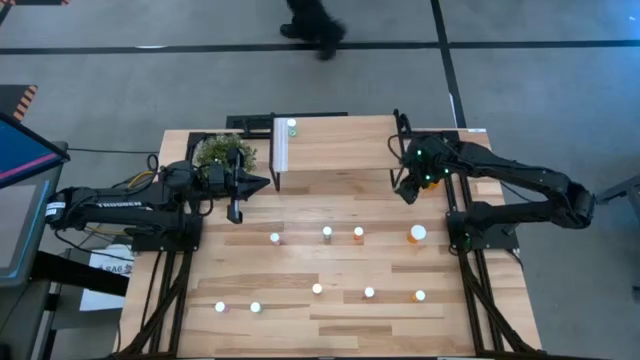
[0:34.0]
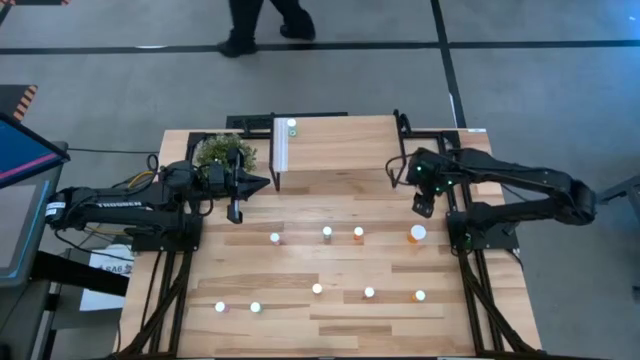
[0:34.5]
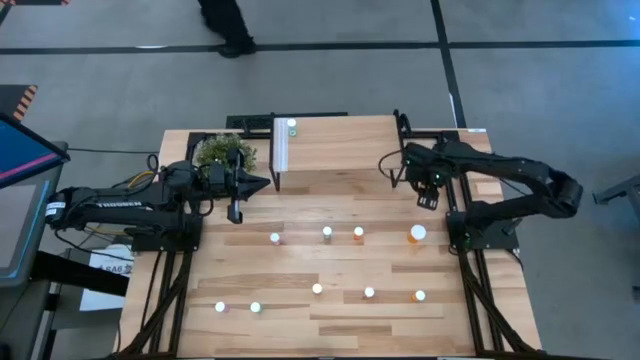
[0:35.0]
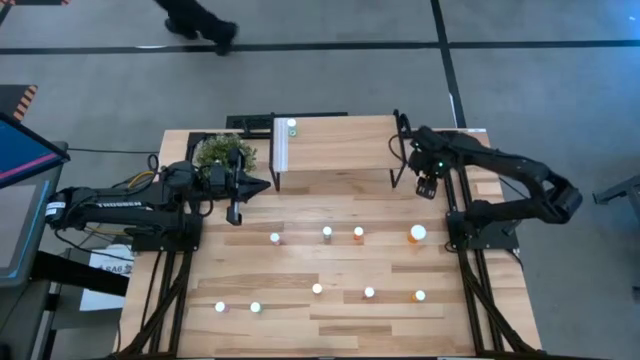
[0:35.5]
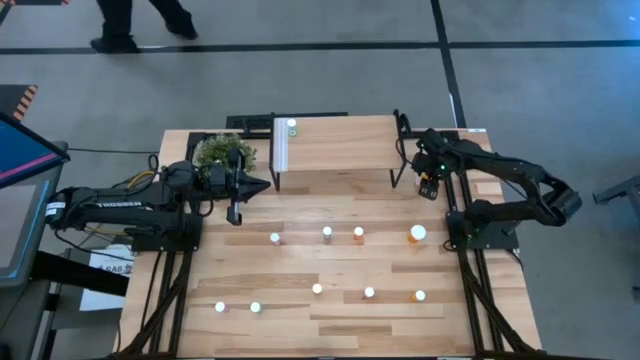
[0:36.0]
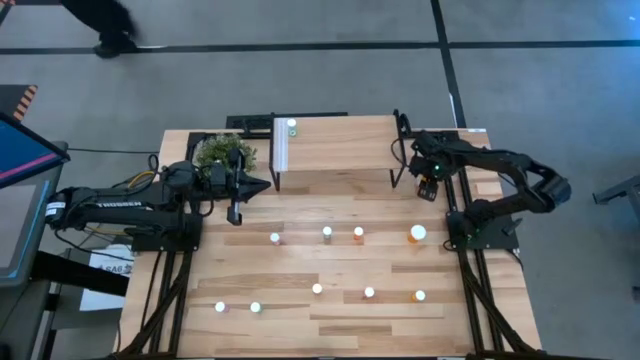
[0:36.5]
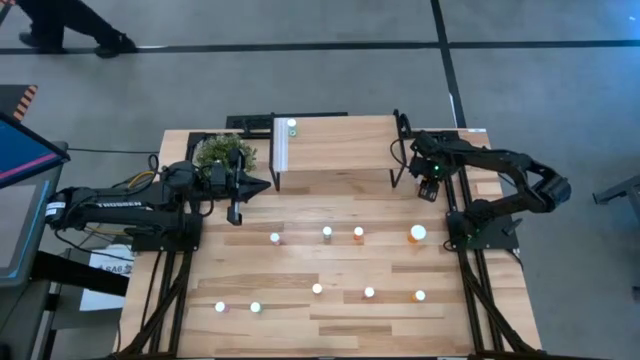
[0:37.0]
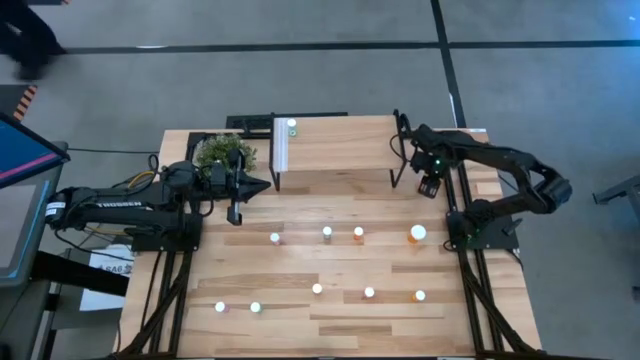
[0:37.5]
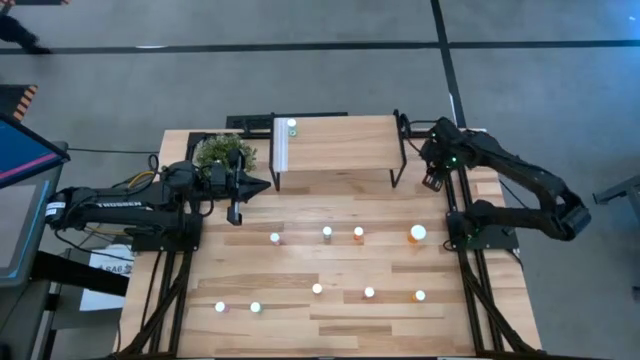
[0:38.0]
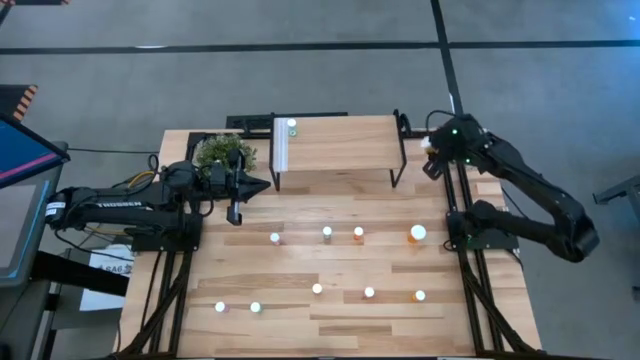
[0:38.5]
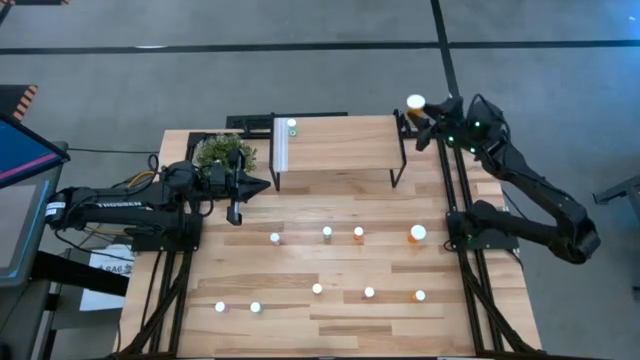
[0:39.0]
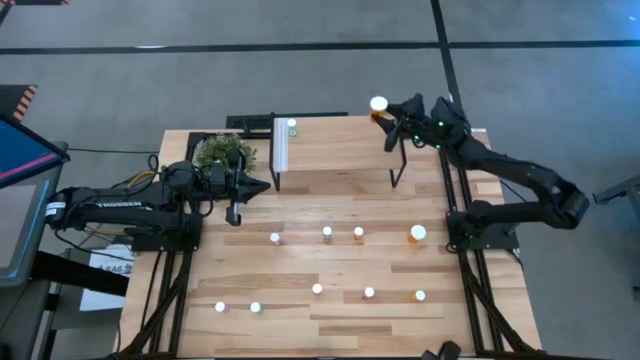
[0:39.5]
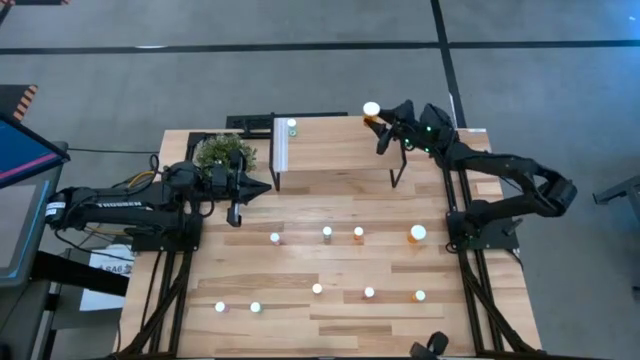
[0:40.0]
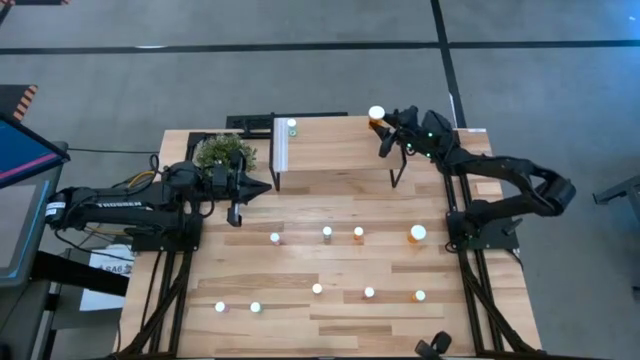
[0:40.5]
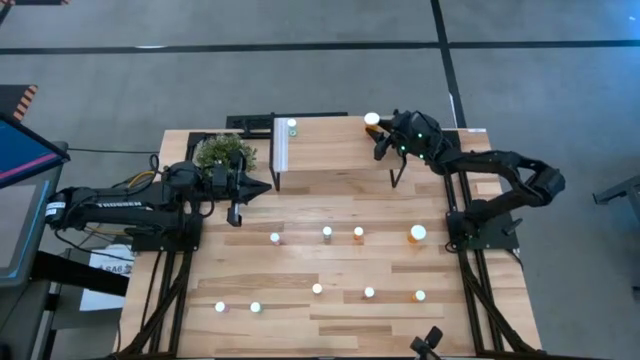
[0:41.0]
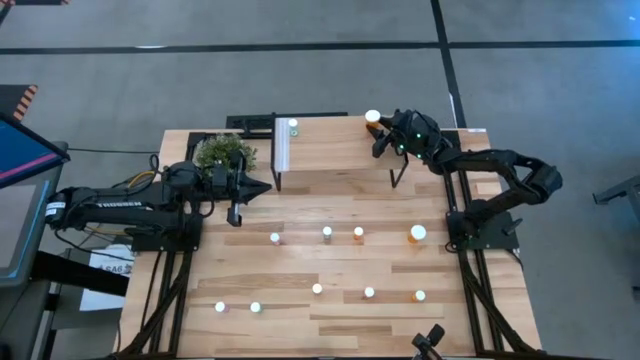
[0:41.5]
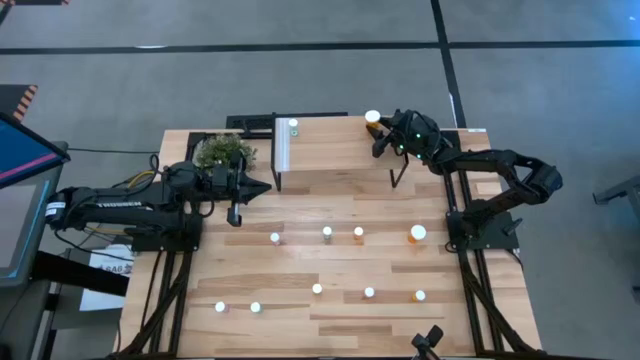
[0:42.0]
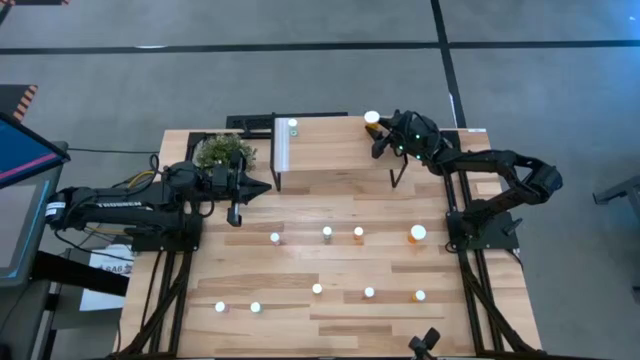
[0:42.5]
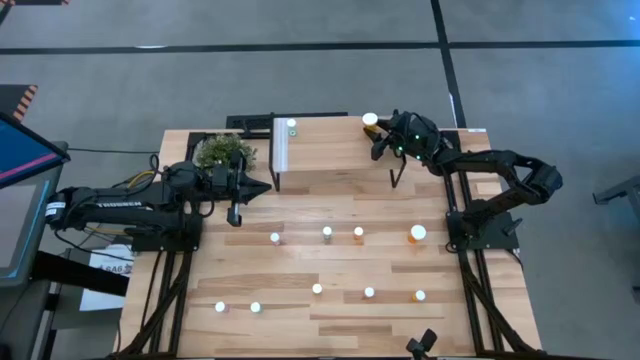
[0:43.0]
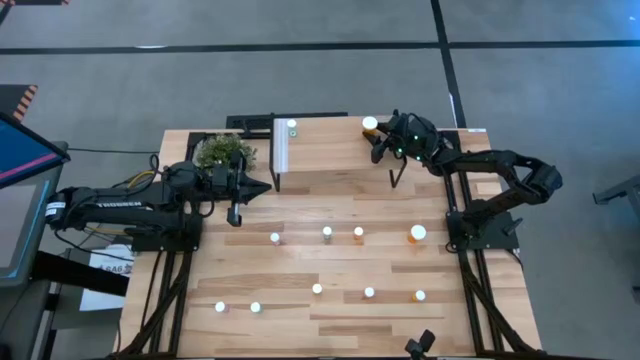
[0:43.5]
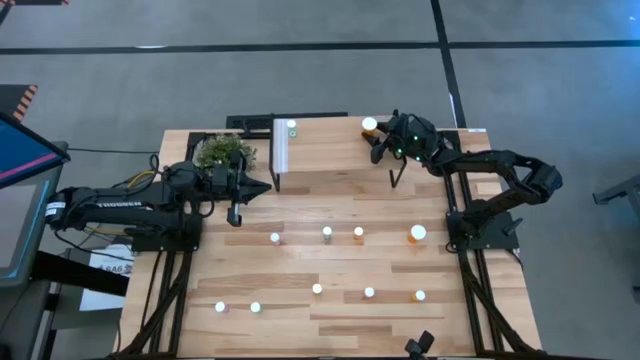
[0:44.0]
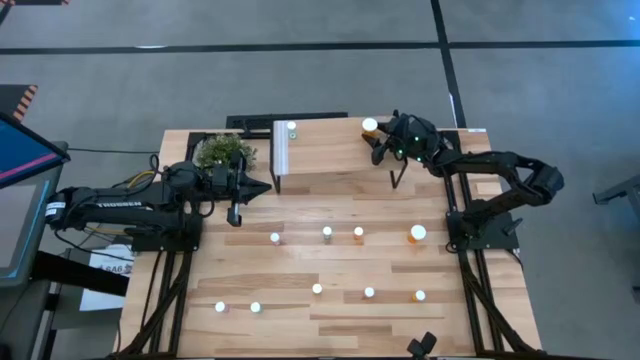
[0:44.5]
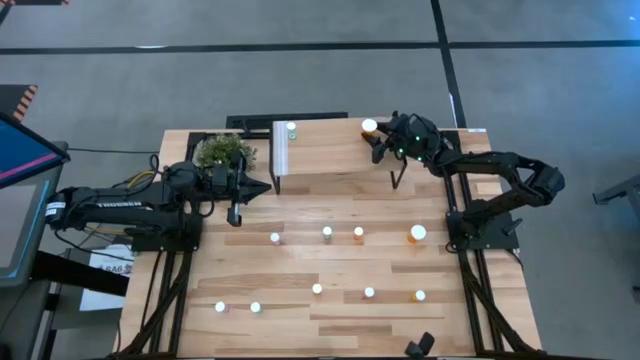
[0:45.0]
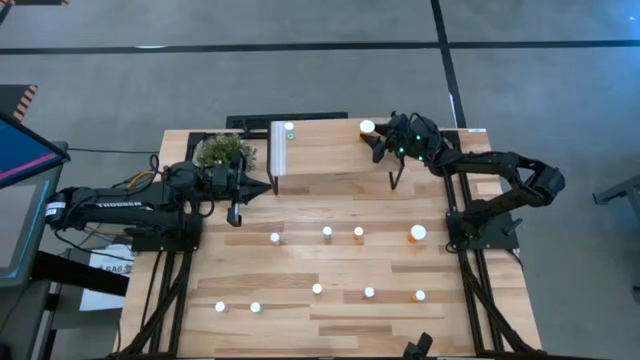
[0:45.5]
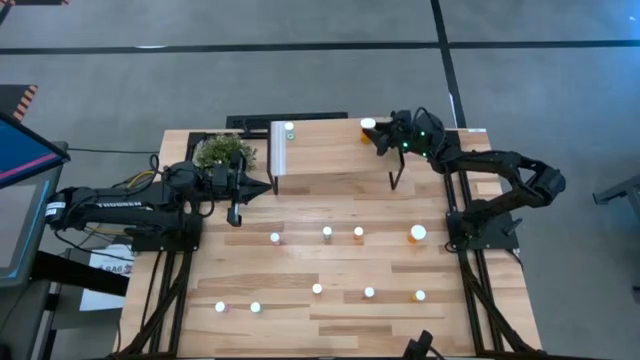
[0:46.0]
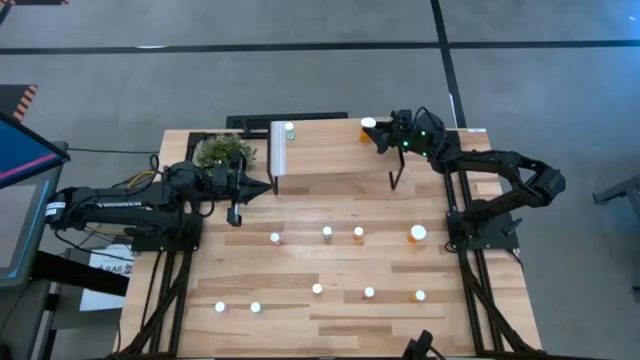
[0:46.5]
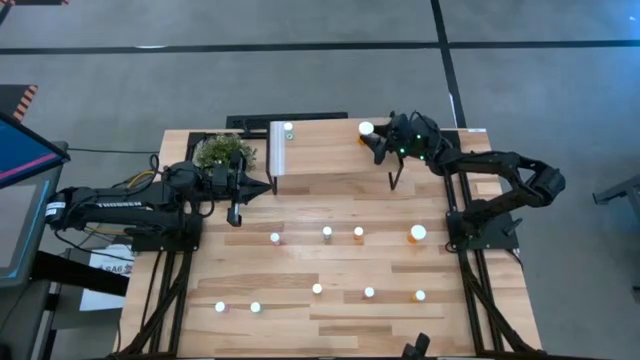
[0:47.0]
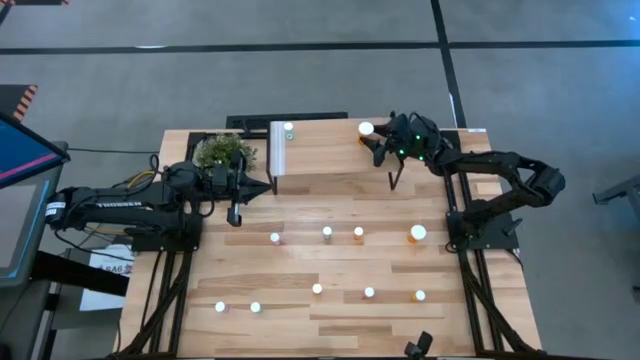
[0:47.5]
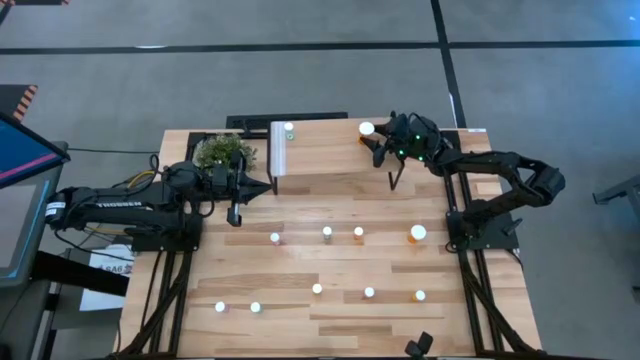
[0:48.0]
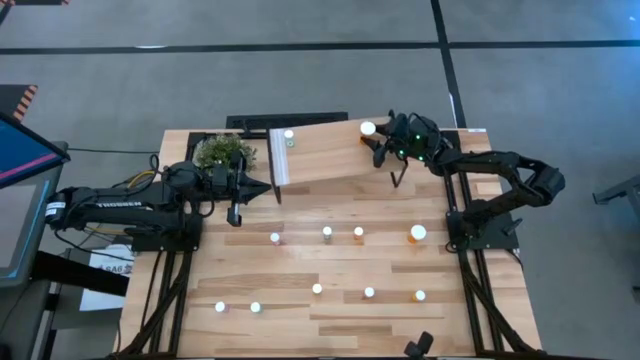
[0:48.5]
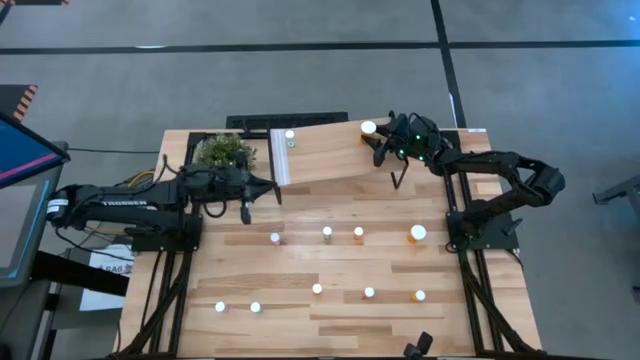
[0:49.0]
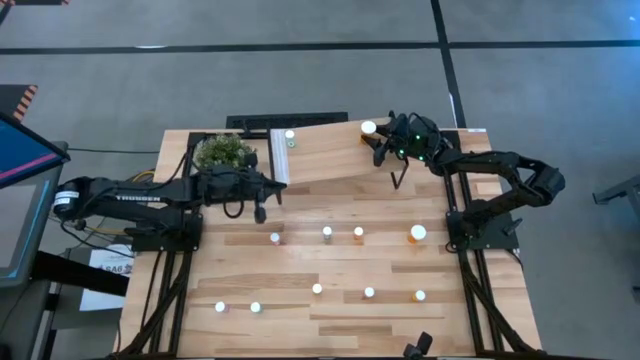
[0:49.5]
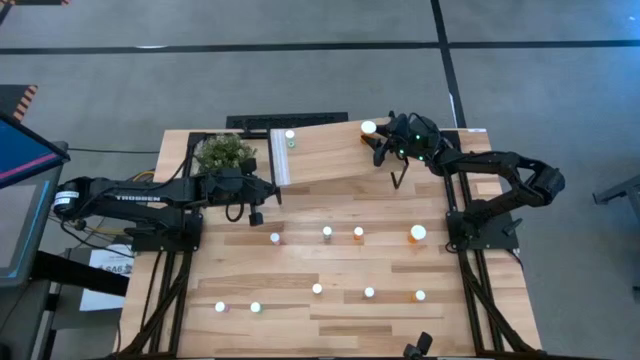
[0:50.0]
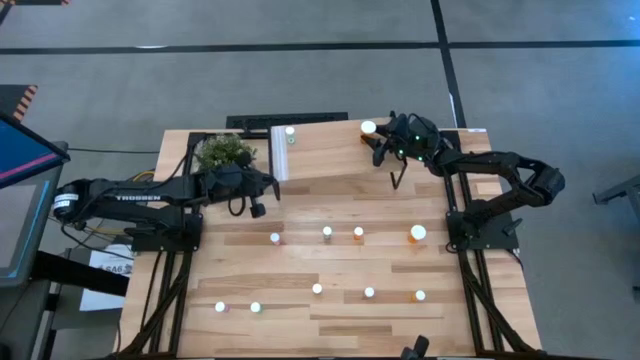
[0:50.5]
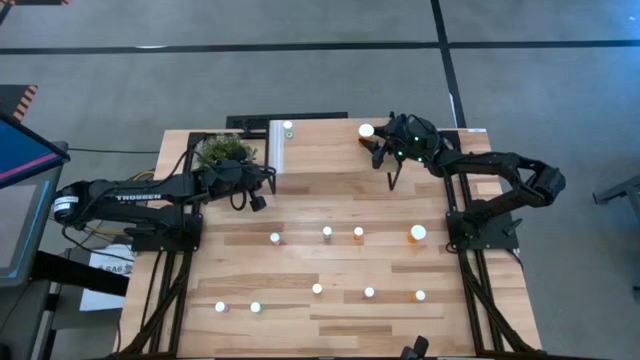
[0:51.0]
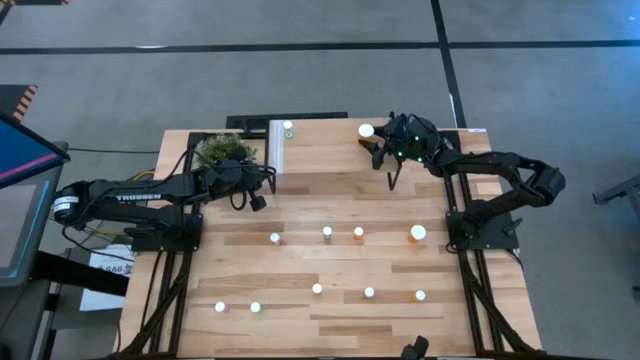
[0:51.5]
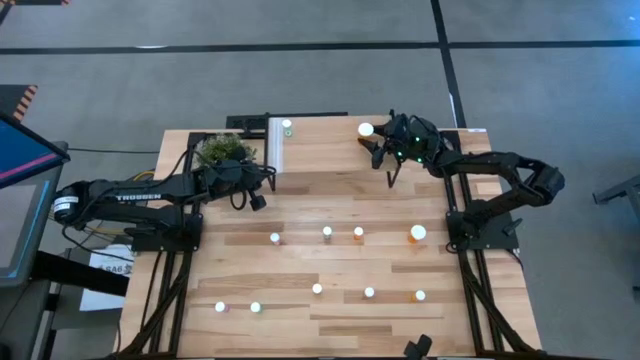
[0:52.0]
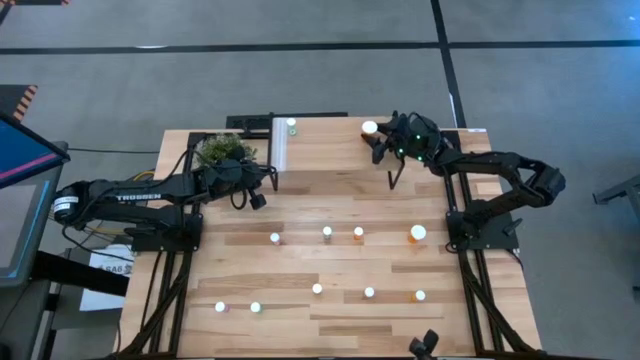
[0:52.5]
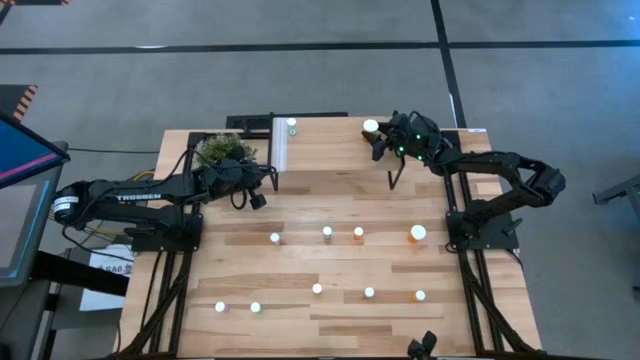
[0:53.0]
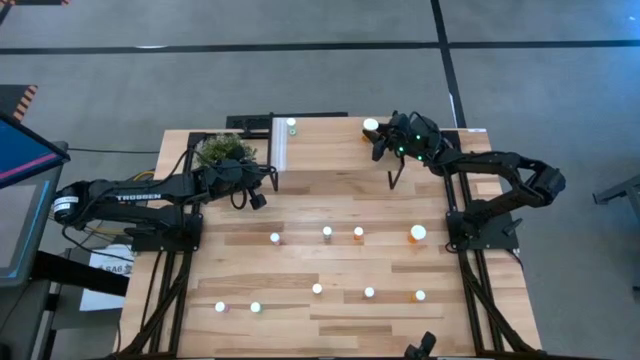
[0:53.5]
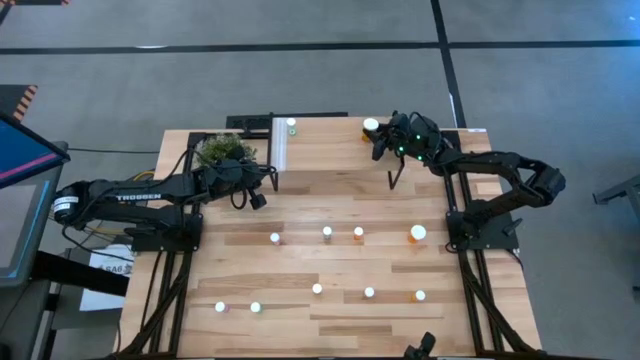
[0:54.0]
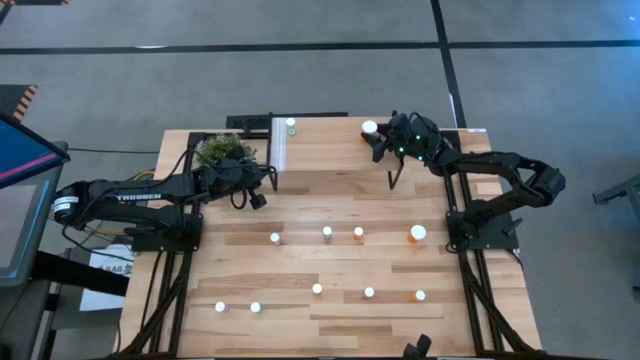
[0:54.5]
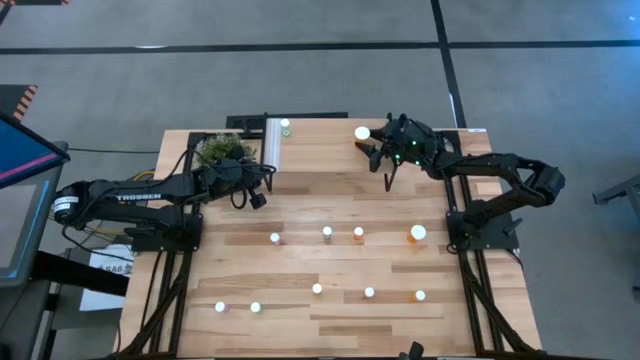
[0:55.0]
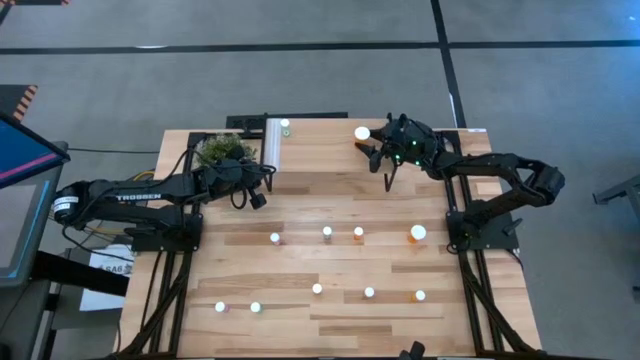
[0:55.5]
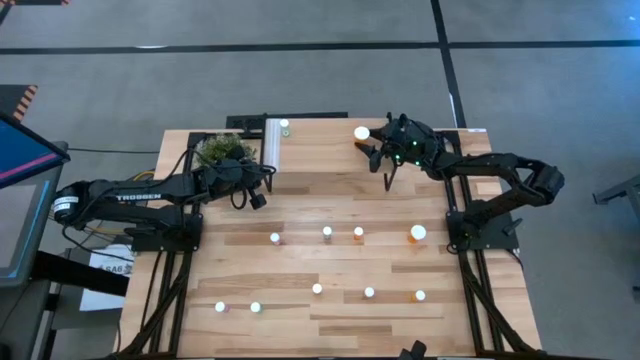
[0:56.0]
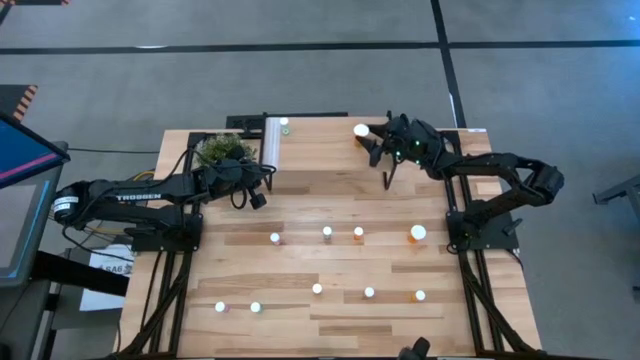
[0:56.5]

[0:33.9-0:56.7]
Task: Pick and place medicine bottles onto shelf by color
Put the top orange large pill bottle on the shelf
